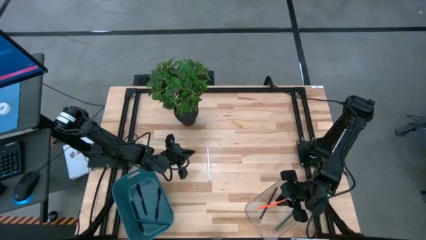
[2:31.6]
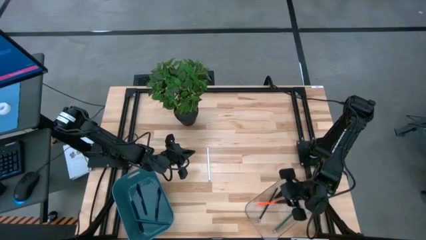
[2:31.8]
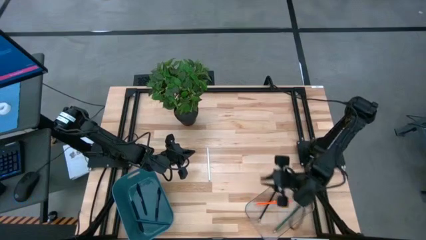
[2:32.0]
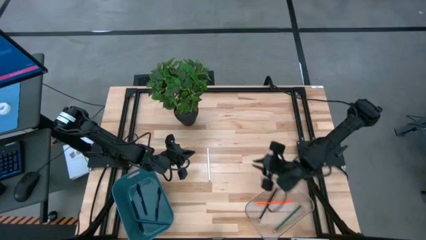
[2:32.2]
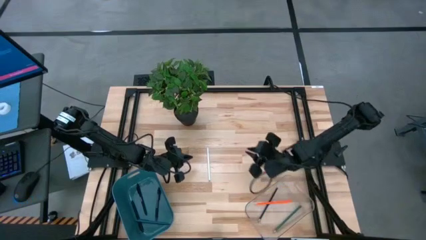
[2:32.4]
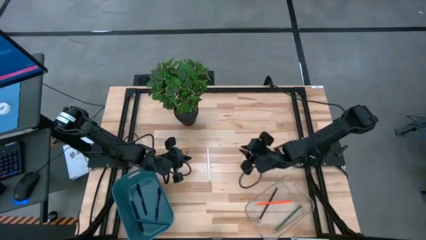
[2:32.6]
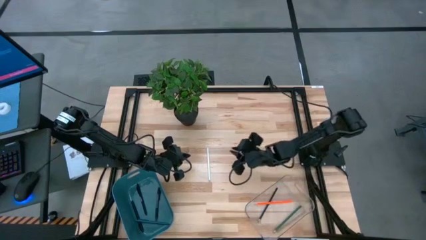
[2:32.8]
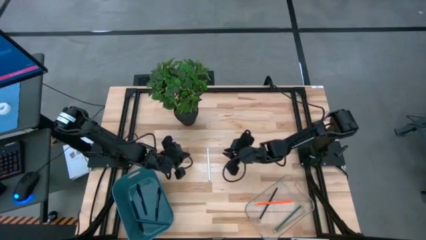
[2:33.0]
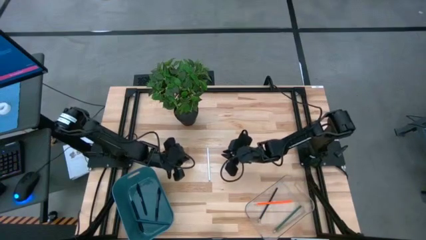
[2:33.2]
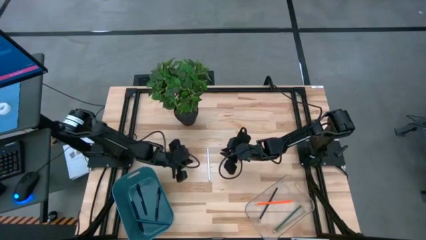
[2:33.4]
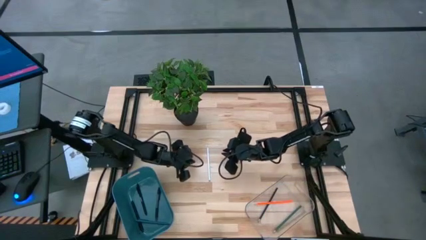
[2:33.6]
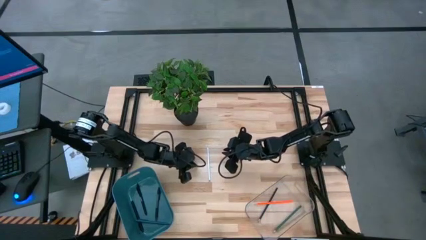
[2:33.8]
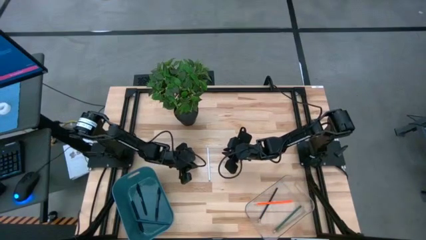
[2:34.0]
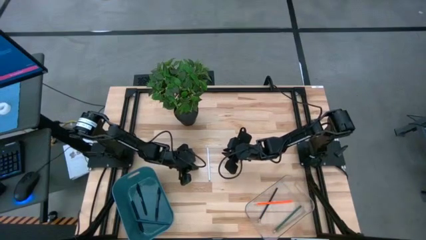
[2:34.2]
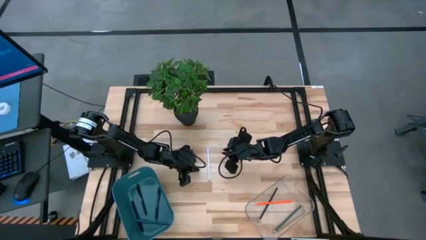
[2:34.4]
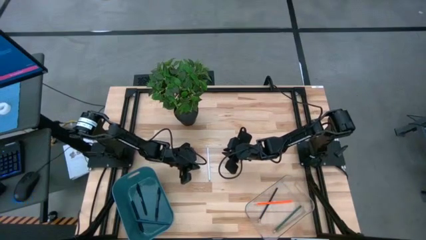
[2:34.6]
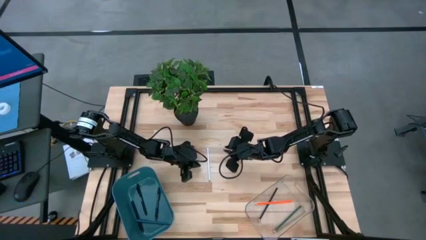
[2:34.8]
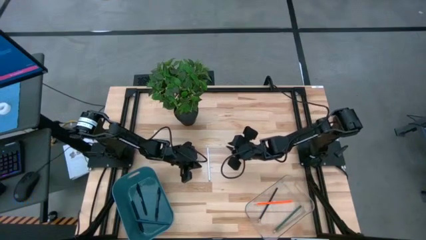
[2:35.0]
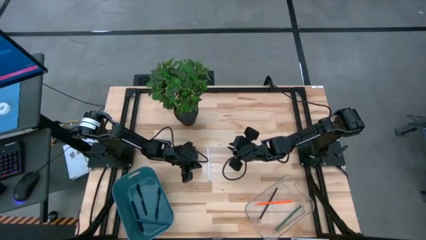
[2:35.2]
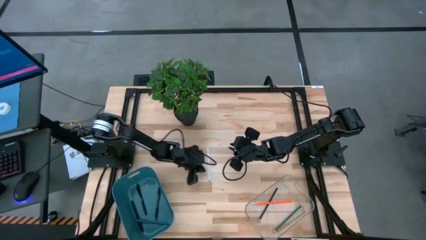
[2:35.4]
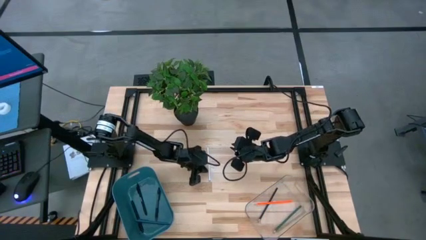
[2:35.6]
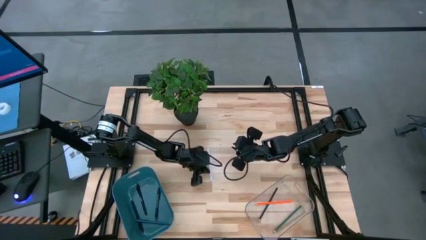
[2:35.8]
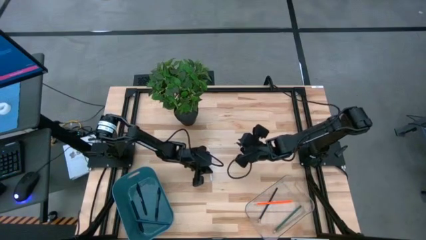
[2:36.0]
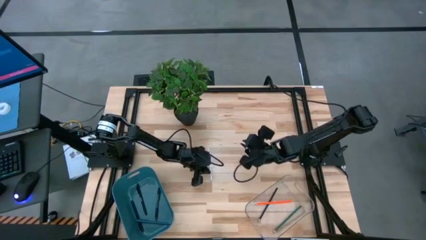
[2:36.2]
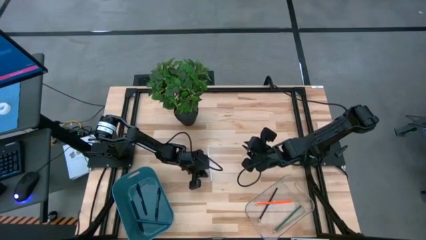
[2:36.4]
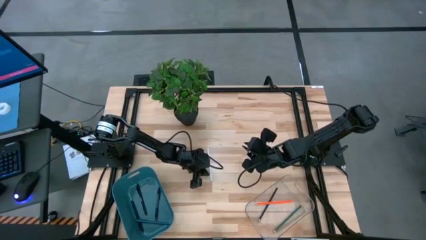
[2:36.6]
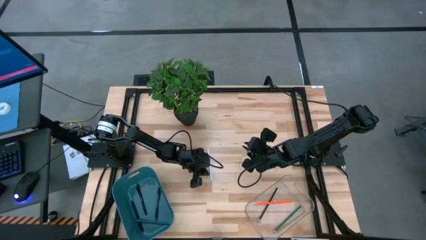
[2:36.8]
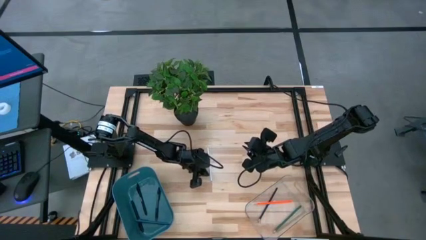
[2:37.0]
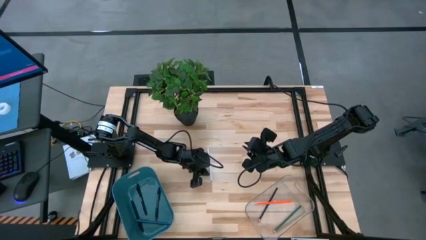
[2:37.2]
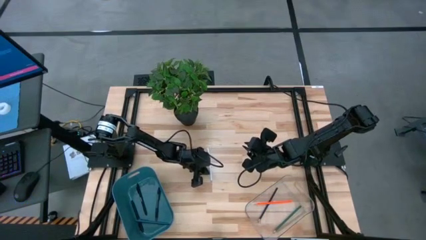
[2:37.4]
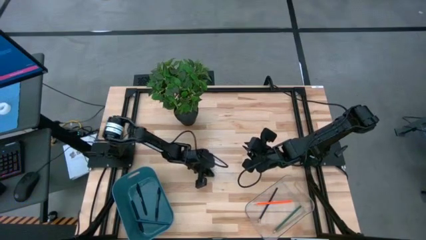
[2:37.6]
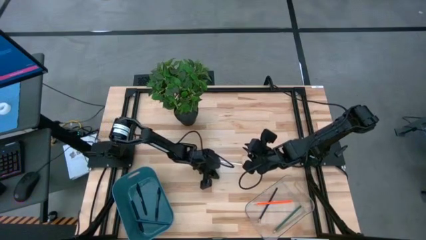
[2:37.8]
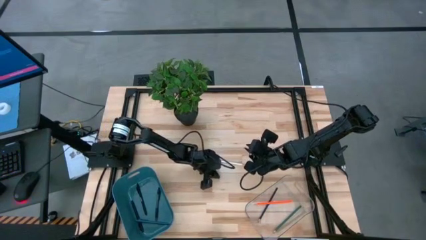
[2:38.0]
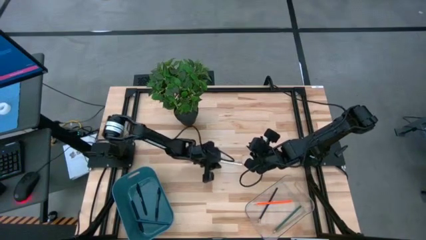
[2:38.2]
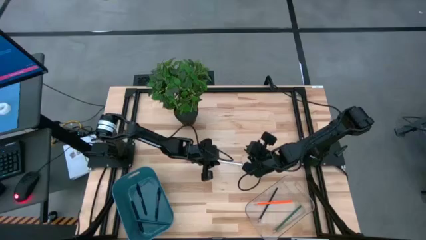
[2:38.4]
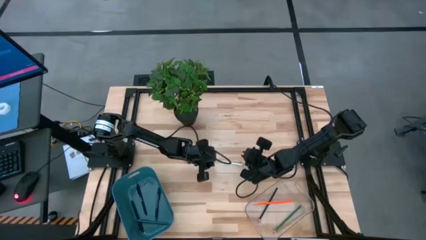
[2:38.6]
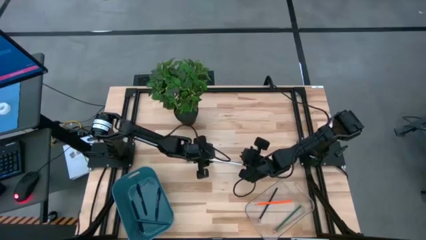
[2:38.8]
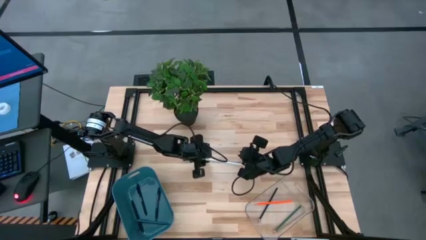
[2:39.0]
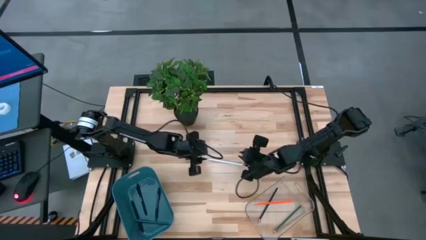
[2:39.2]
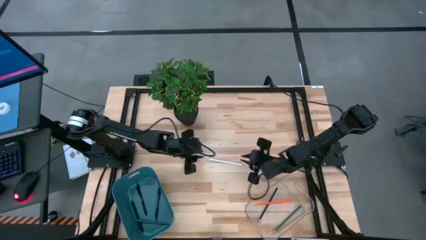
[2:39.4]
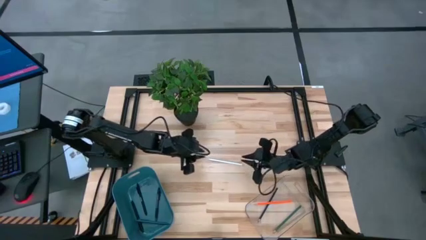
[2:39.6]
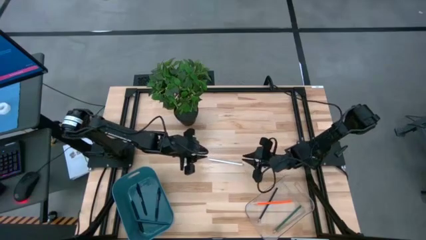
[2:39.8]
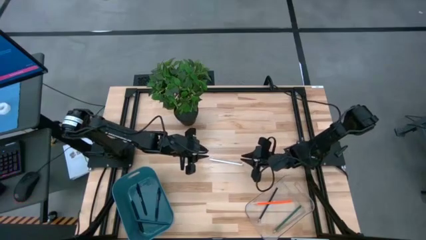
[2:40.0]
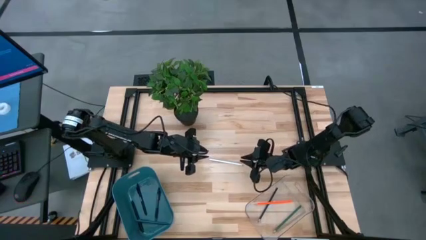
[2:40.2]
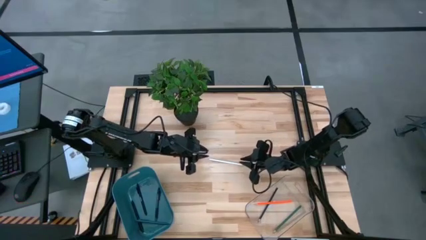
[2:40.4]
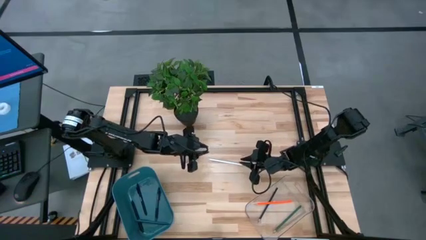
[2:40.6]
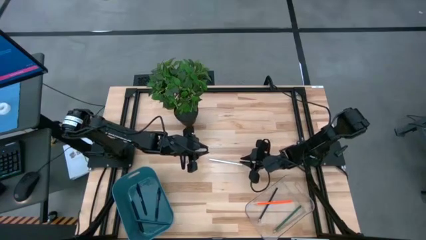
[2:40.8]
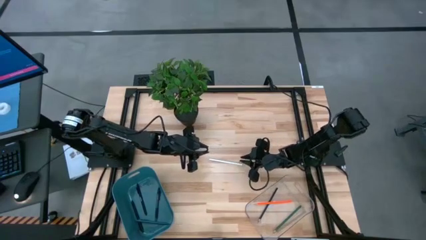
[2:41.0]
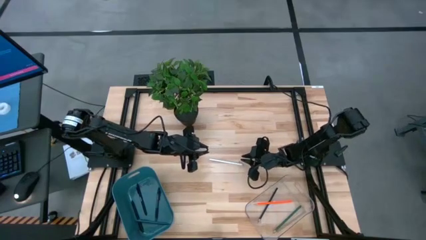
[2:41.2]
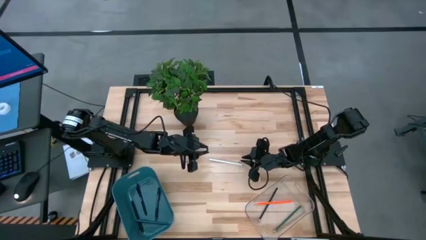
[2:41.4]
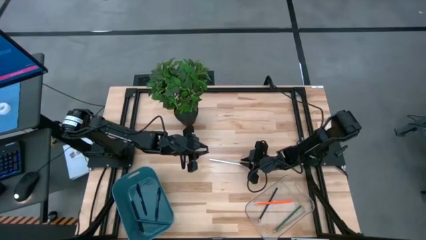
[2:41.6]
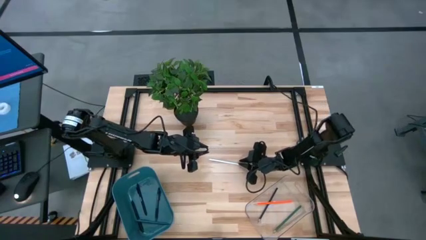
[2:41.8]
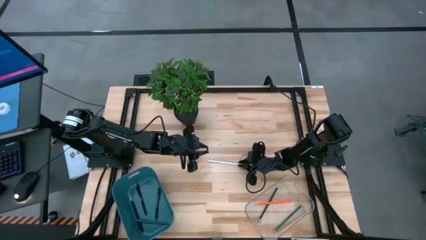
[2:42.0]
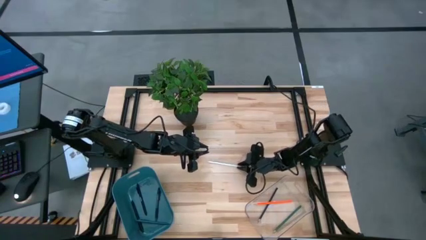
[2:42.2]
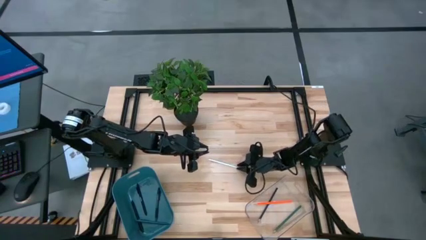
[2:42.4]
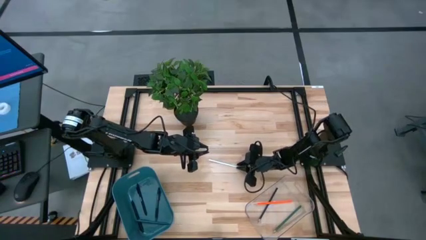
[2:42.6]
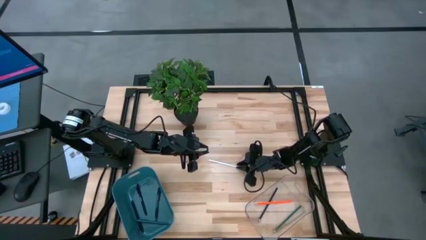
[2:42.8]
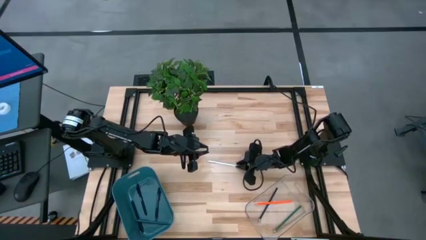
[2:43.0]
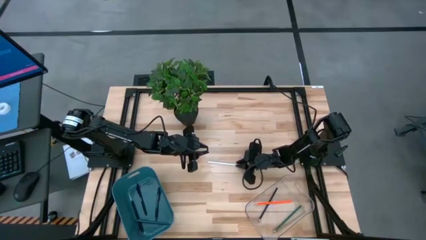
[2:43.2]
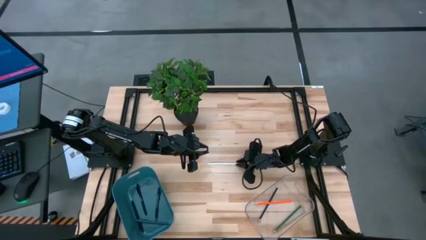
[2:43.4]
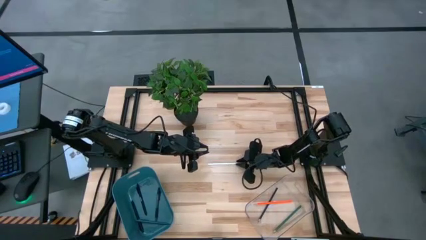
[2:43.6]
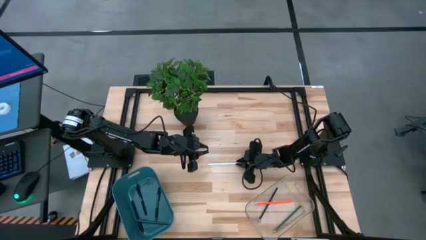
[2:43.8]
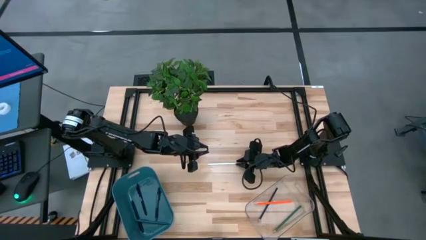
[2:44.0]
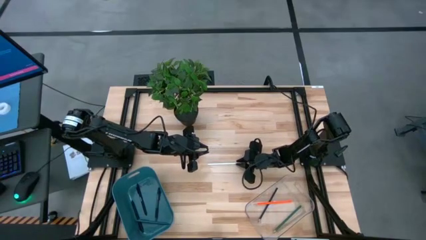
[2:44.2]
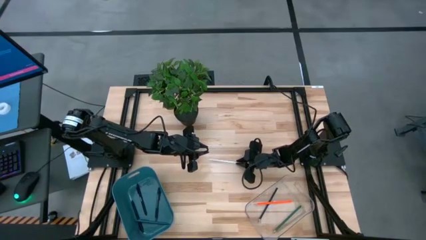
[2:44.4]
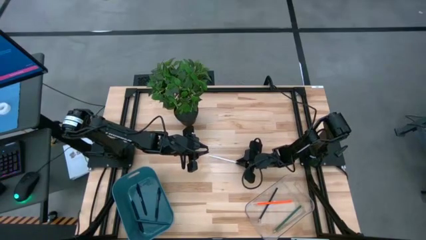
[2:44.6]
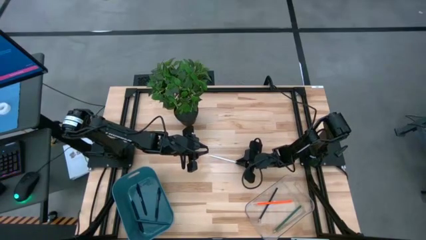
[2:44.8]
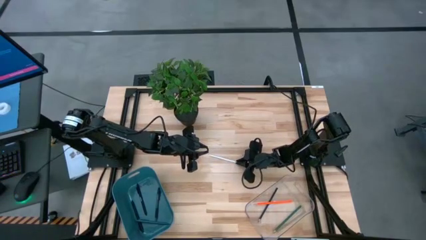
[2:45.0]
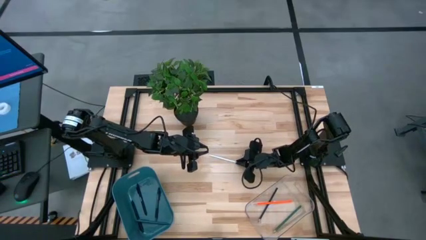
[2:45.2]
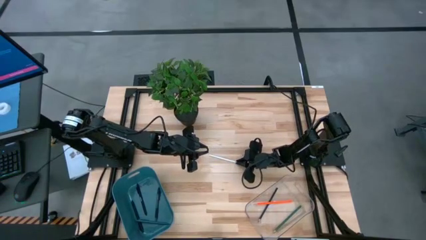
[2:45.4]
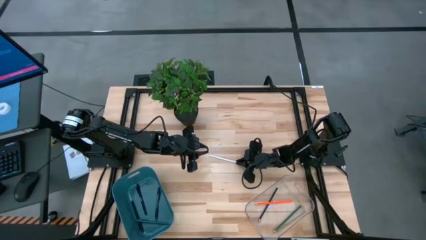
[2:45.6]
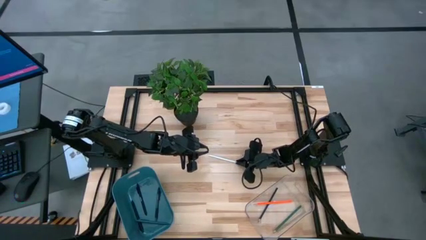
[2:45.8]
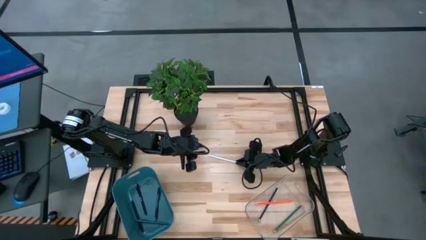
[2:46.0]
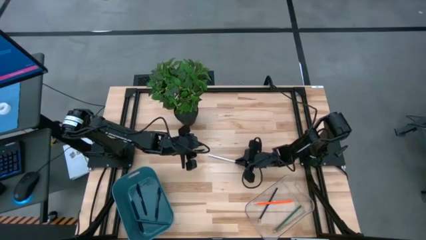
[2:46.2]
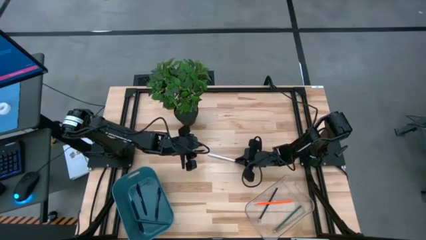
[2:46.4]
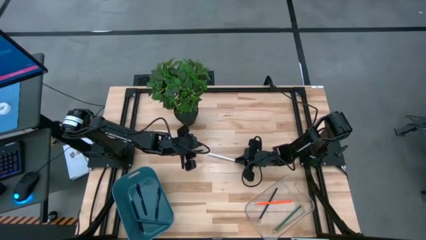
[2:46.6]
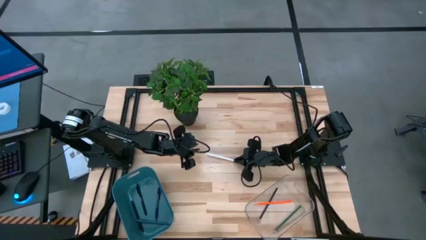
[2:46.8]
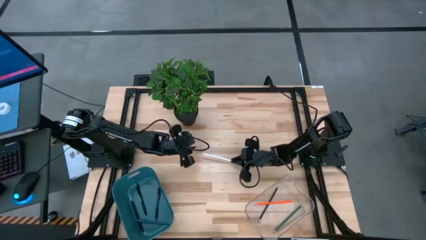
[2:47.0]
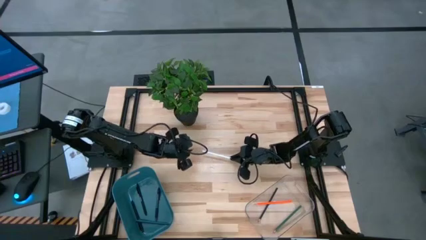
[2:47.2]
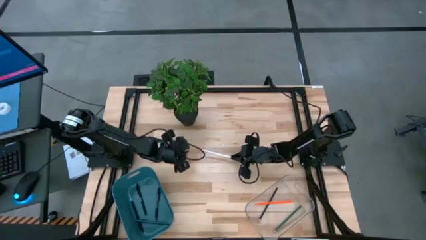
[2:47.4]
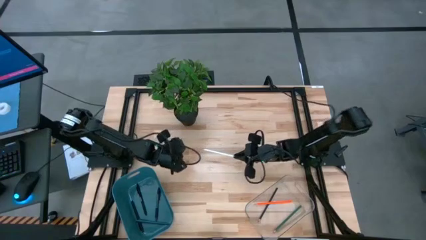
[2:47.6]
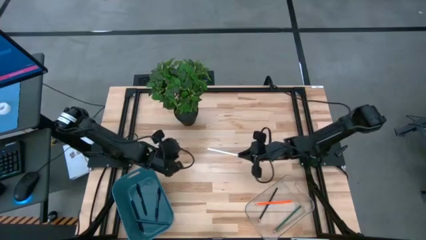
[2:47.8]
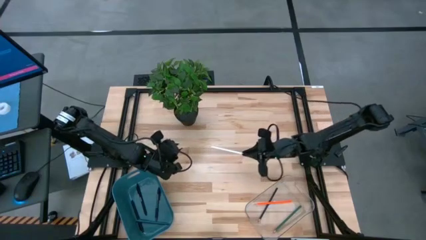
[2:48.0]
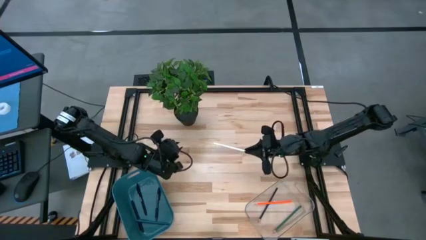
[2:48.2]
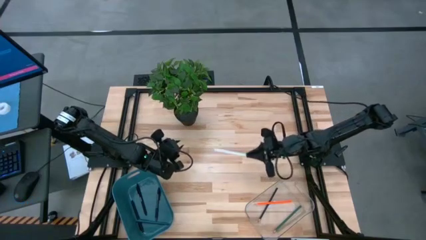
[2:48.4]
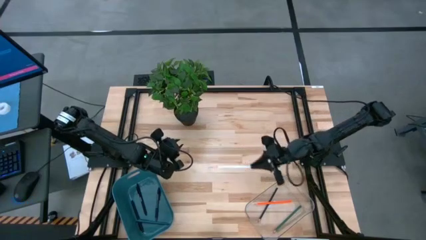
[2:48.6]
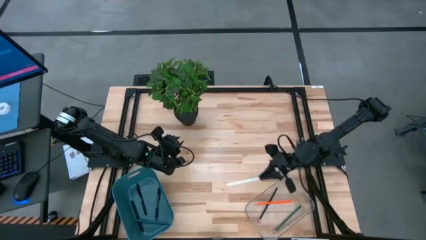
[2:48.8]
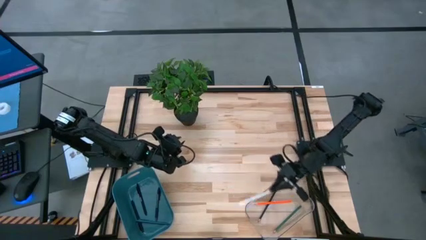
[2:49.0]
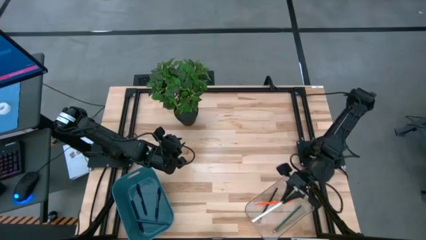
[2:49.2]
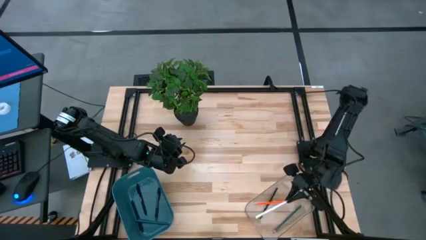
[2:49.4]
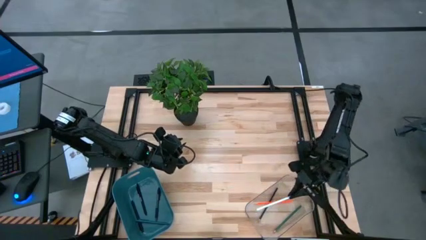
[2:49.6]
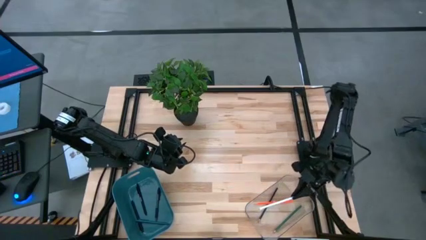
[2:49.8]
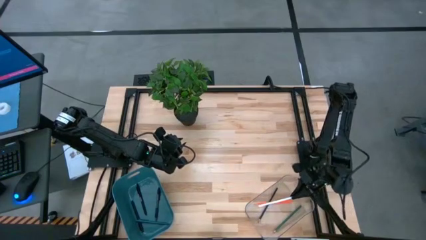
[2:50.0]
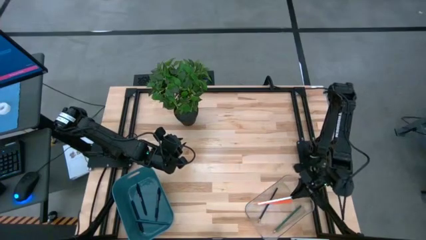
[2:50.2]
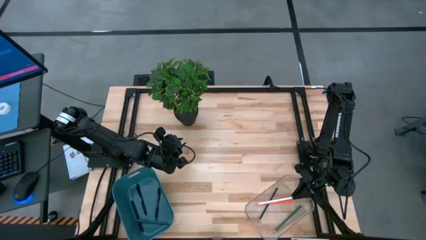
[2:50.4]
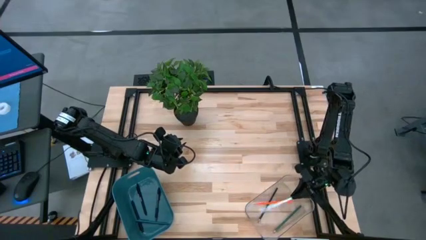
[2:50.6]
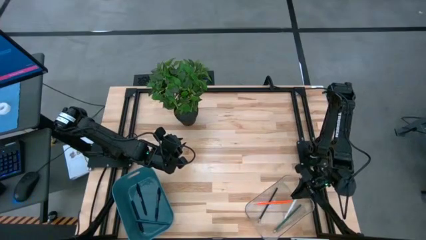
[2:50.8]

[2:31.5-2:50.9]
Task: Sort pens & pencils
Put the white pencil into the transparent bin
